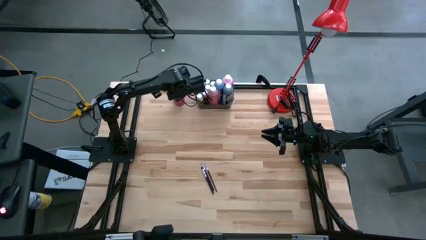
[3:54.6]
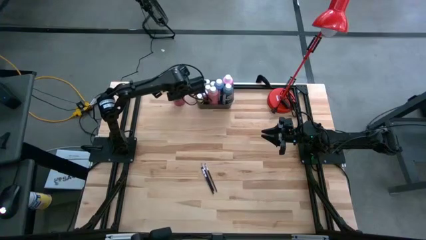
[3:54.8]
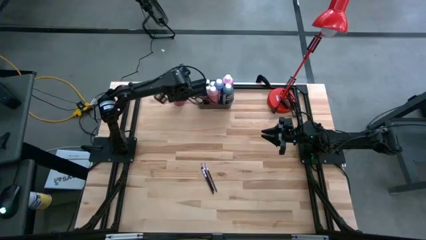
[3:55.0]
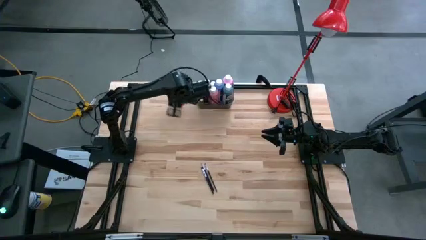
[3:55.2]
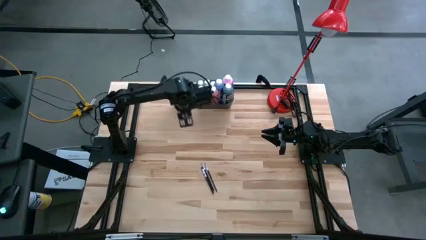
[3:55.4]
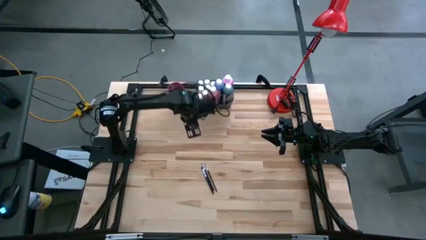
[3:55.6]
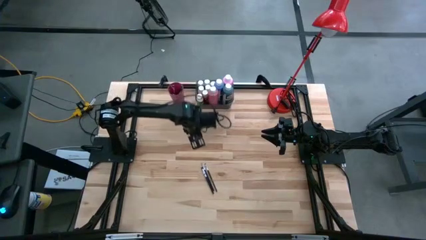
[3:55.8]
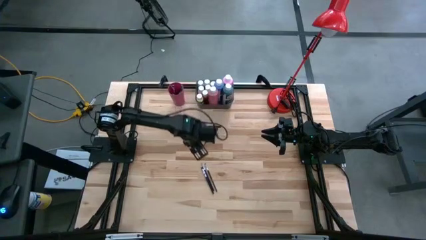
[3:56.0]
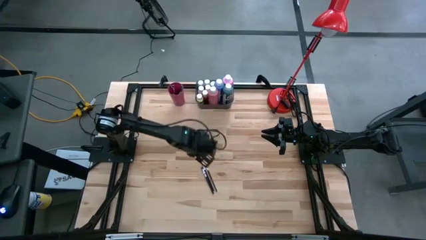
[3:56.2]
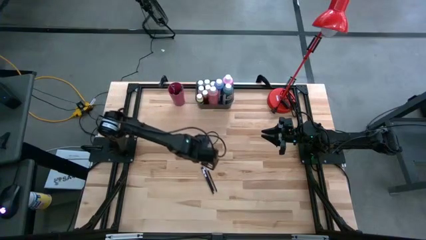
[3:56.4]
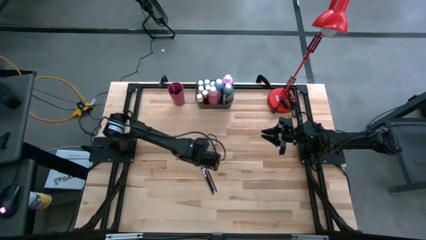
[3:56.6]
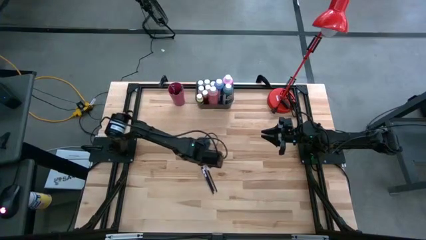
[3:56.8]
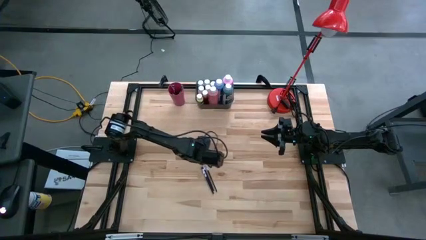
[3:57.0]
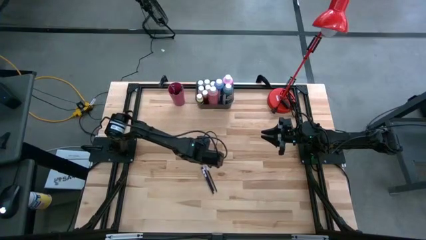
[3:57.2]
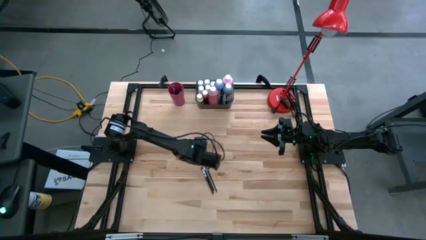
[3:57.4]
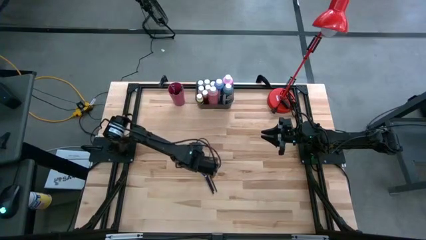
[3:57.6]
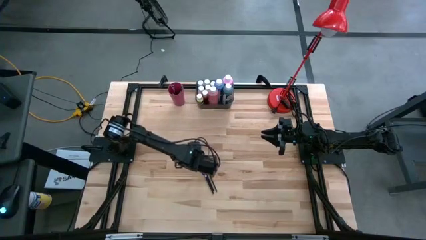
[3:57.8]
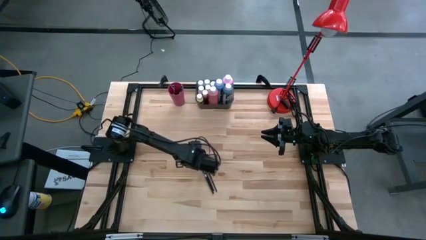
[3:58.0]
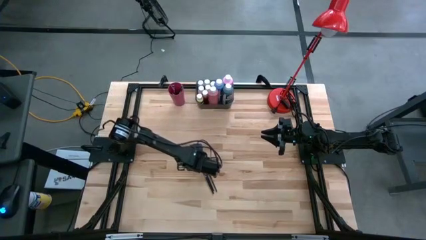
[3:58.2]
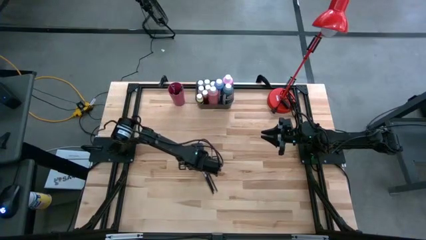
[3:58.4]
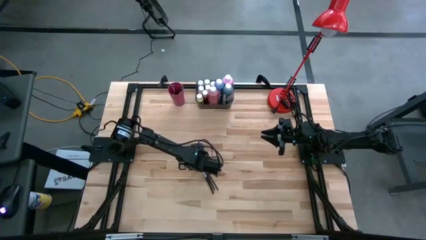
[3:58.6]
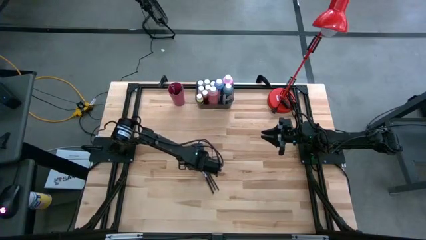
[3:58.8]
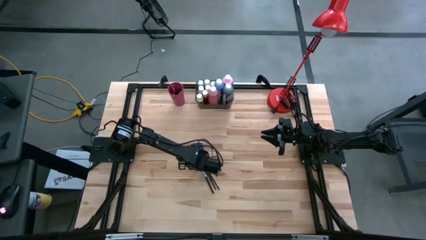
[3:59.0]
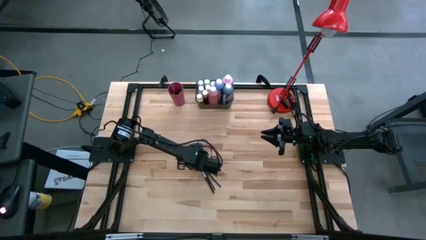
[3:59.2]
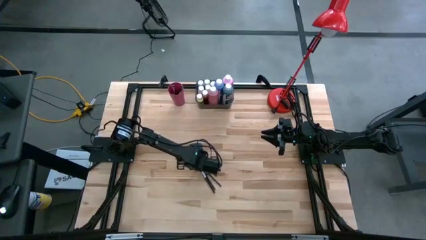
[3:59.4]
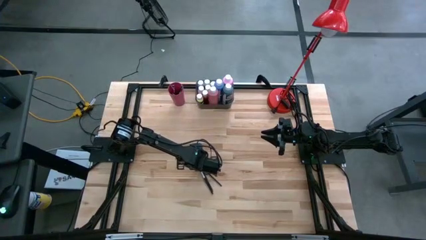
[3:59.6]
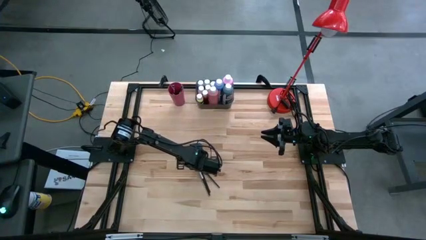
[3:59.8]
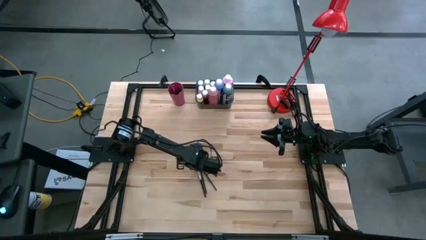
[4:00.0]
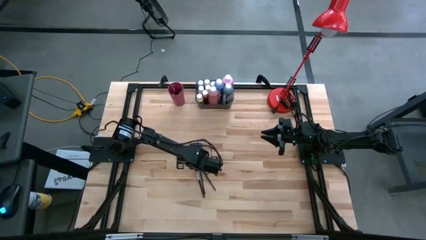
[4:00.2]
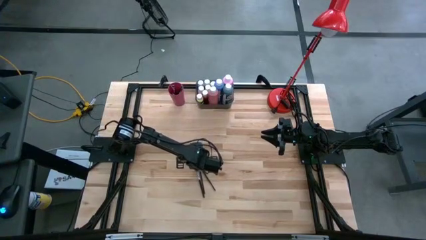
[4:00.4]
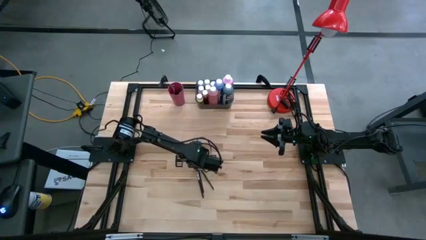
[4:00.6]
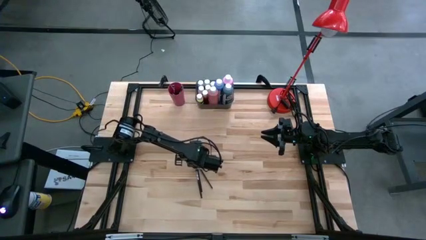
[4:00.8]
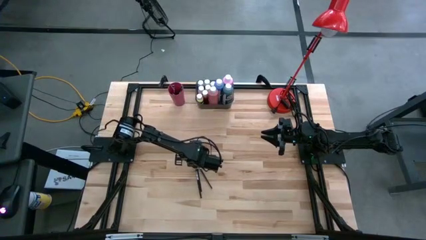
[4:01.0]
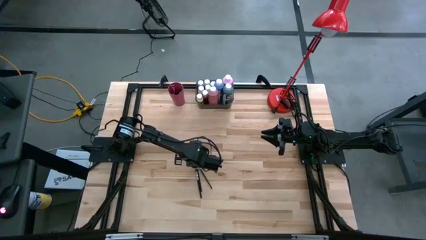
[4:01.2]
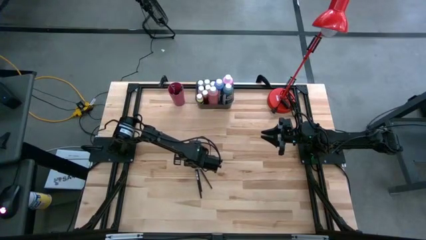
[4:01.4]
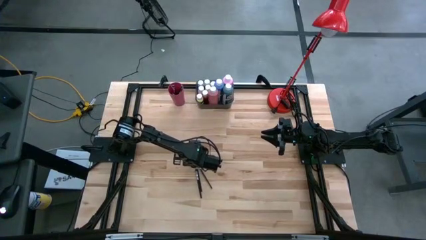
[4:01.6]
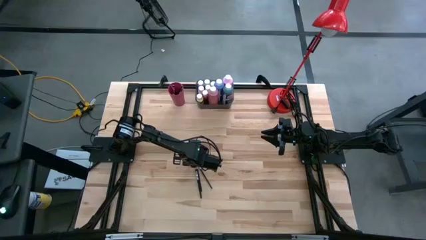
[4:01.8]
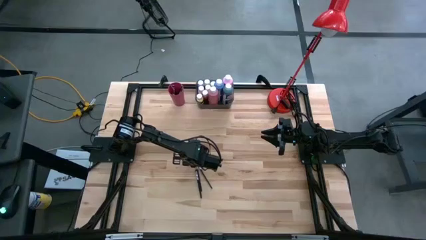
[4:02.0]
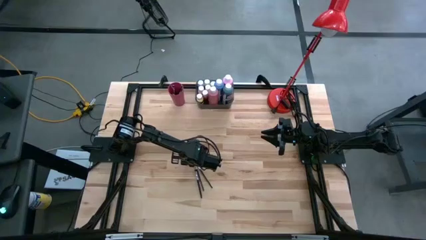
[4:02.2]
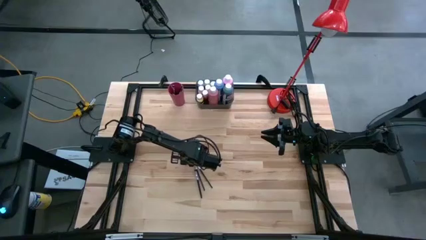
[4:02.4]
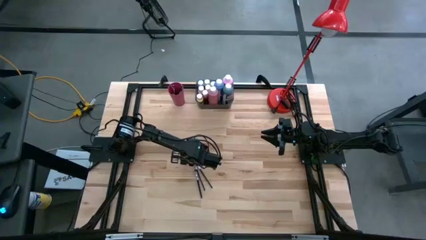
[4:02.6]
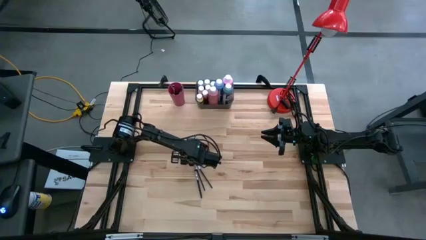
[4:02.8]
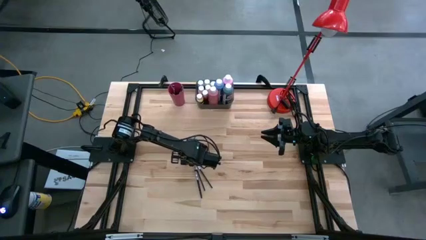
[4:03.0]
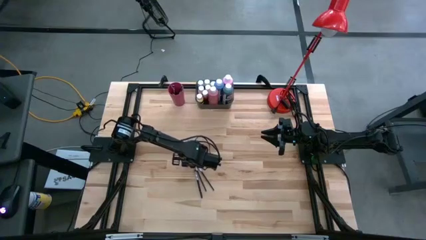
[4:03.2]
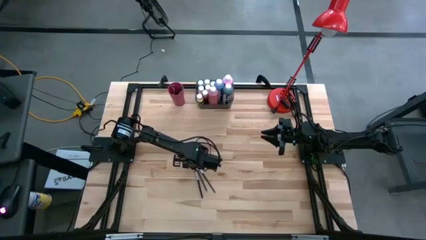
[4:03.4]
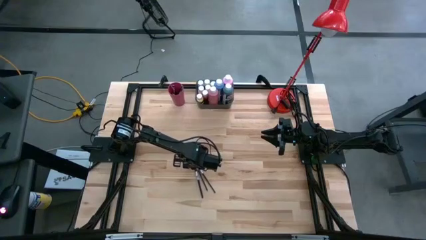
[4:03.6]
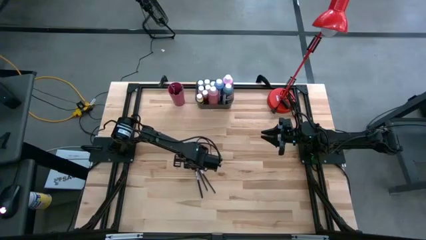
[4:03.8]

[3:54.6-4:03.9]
Task: Pick & Place Paint Supplies
Put the black paint brush into the pink cup

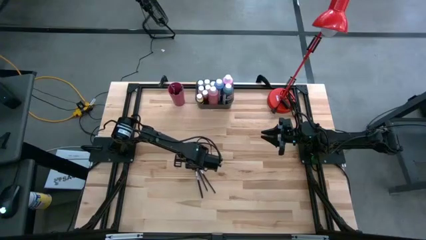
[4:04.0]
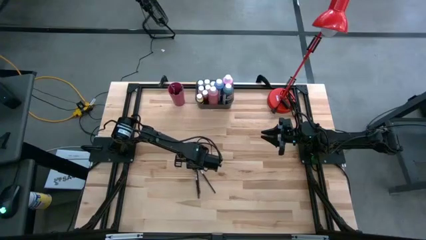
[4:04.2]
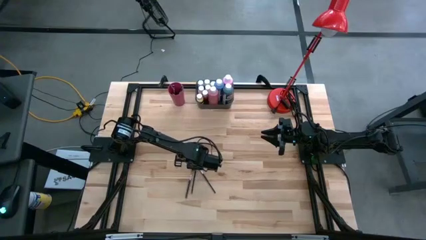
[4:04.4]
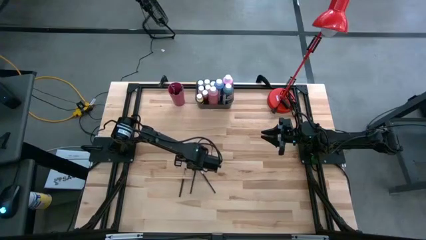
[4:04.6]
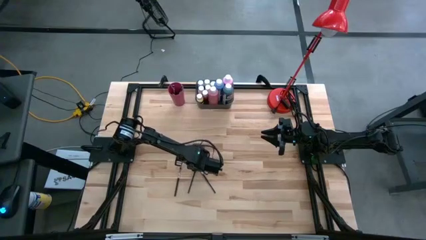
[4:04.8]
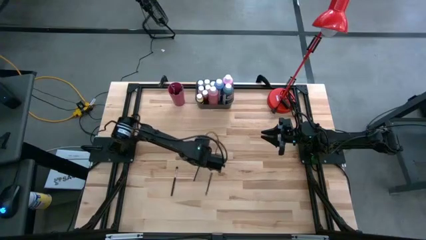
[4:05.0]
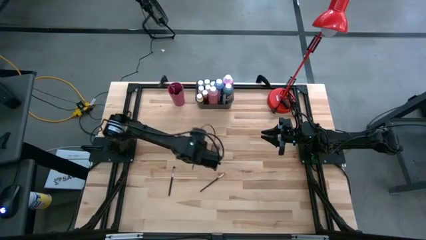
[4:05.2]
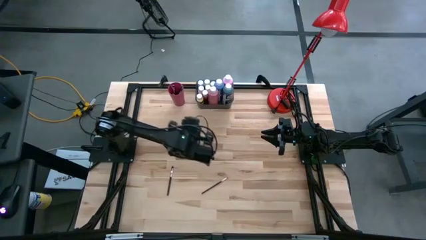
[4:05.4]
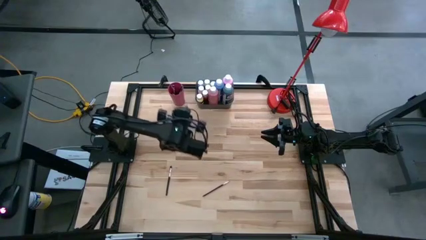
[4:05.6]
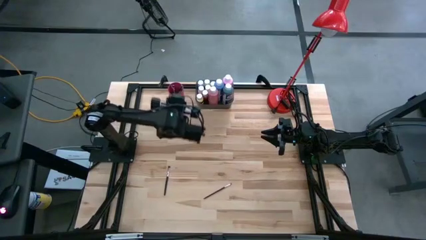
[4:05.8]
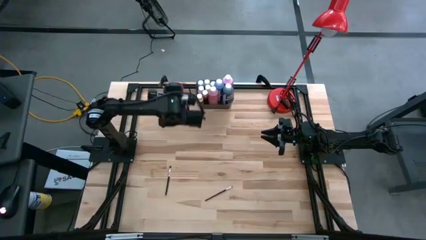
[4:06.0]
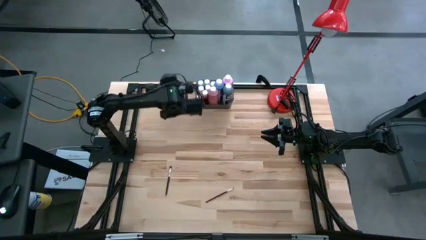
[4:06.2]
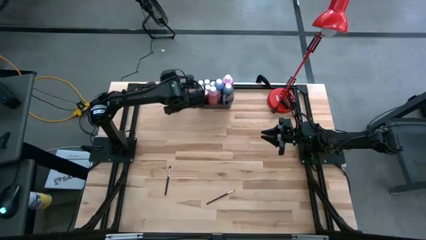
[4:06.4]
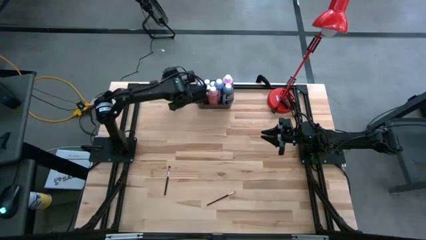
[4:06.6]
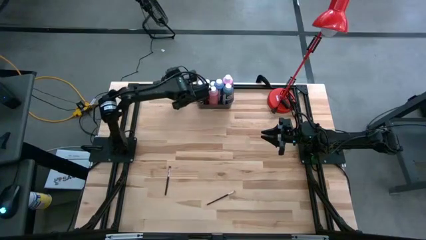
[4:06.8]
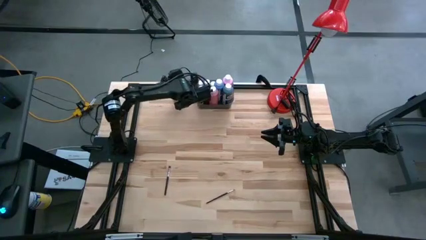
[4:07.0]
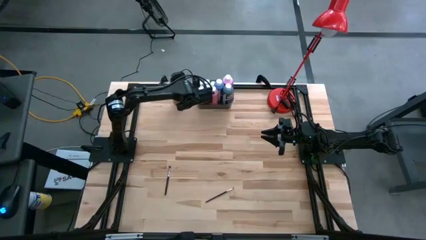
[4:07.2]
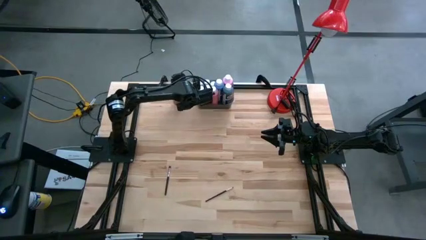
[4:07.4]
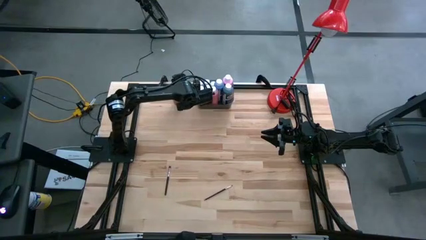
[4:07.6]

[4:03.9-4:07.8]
Put the black paint brush into the pink cup

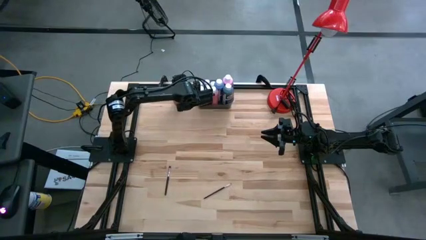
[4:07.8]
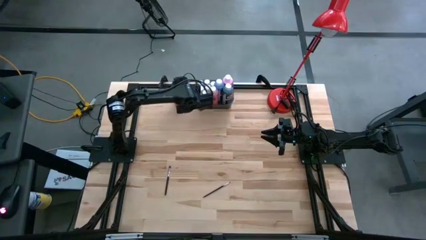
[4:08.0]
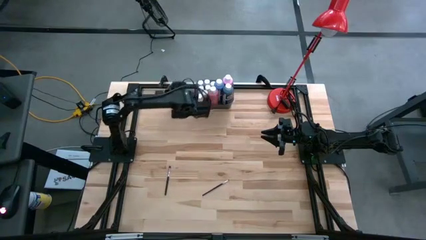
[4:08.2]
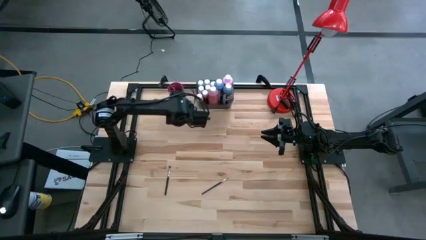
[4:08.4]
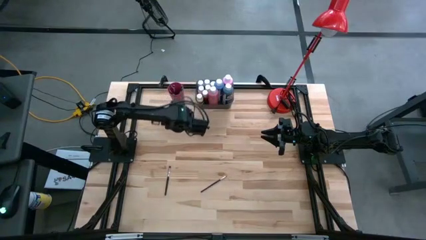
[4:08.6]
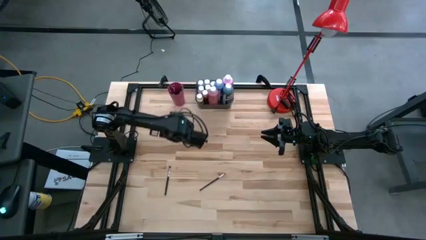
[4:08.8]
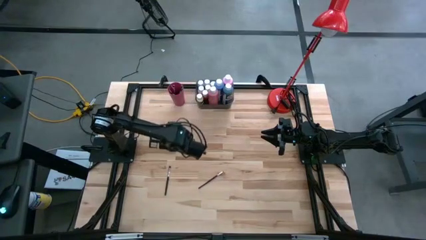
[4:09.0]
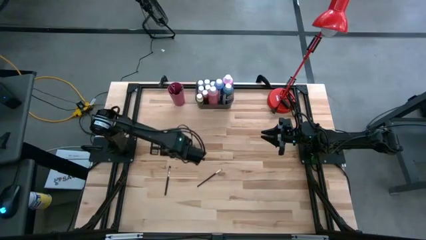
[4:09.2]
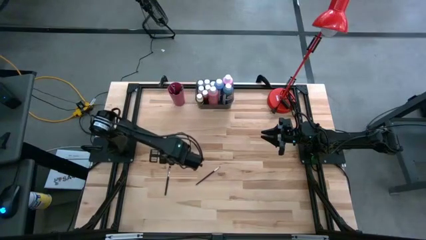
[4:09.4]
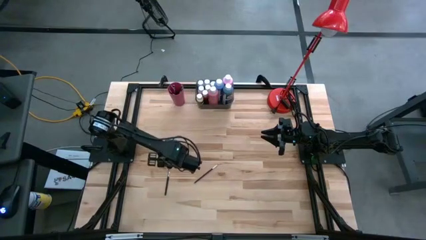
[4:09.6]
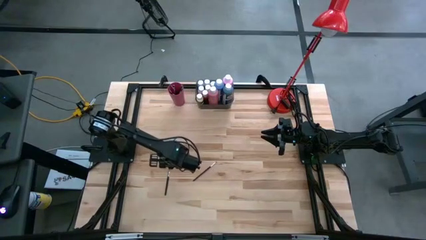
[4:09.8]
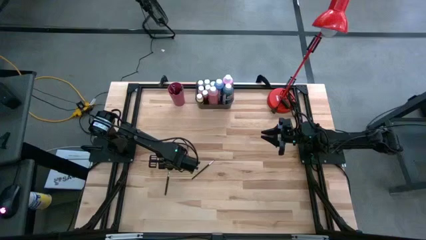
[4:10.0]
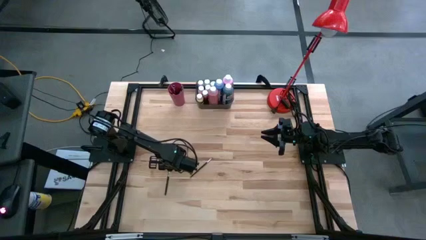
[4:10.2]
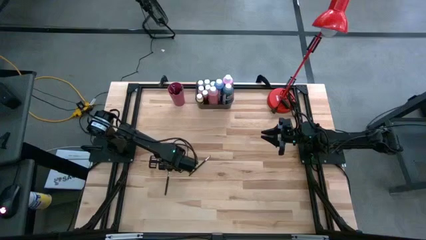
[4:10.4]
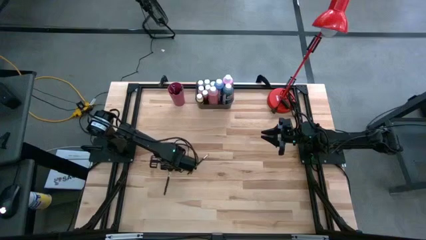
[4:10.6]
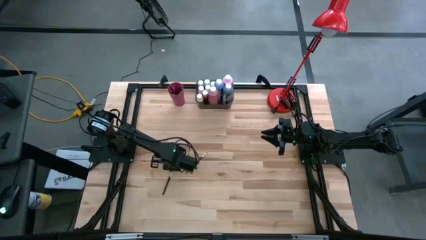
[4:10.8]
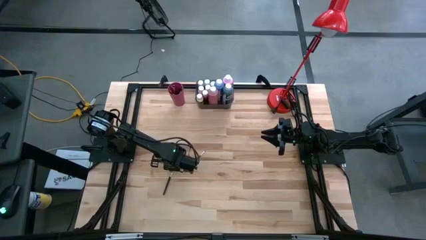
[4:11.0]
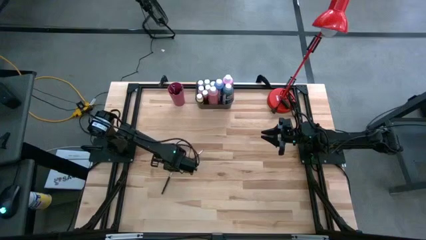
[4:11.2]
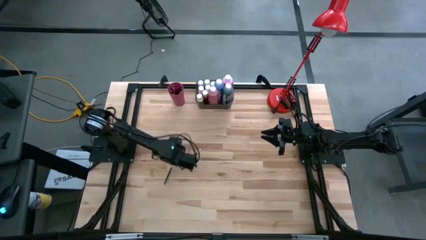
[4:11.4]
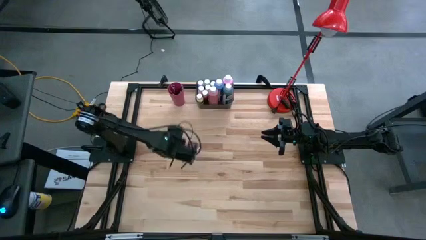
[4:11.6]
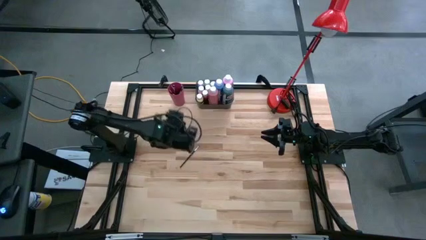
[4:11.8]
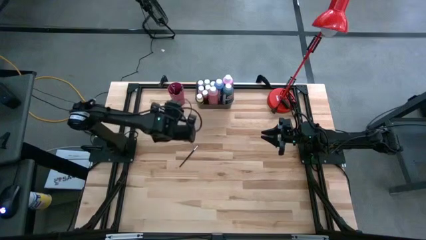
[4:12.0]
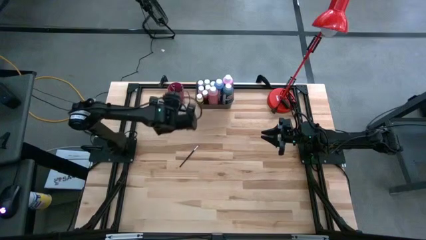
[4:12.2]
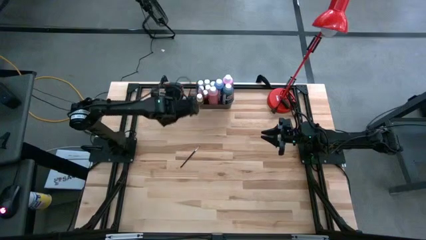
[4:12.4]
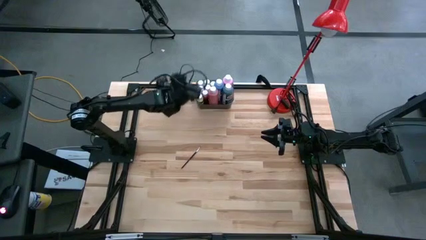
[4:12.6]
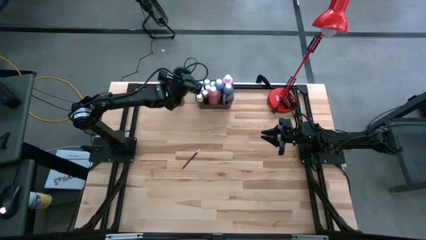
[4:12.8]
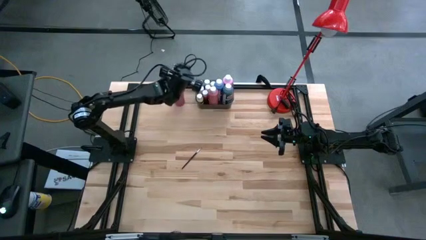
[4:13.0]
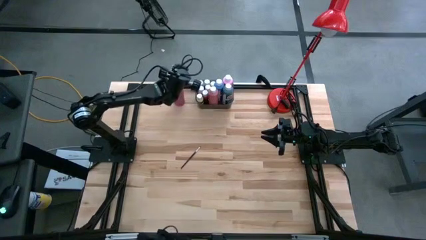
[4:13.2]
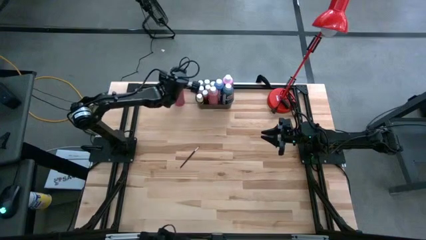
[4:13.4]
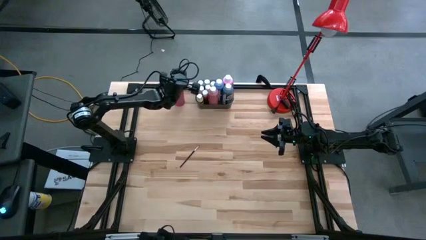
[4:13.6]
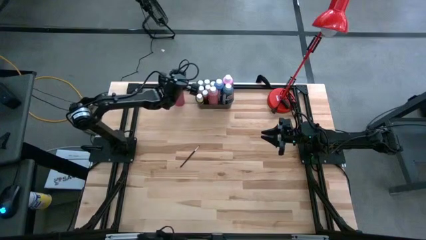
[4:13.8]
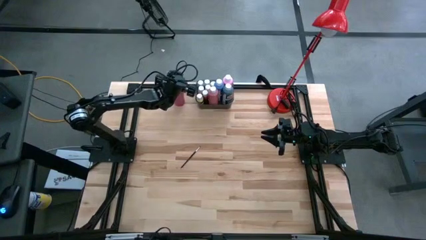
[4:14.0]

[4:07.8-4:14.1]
Put the black paint brush into the pink cup
